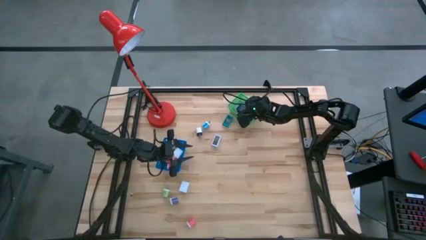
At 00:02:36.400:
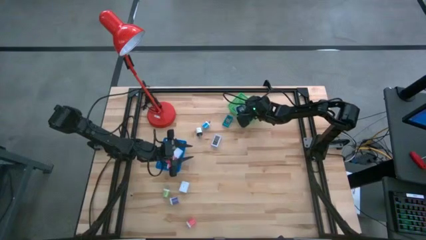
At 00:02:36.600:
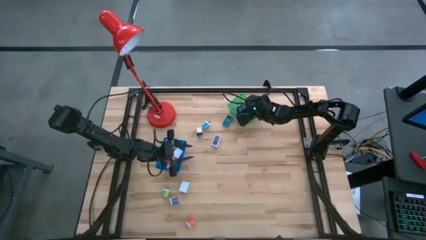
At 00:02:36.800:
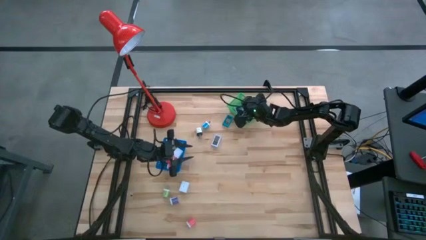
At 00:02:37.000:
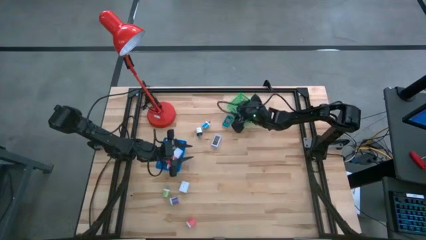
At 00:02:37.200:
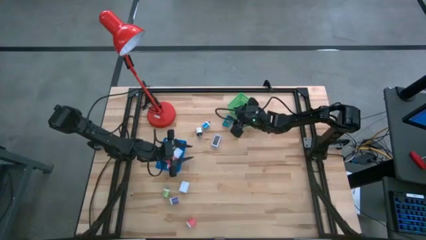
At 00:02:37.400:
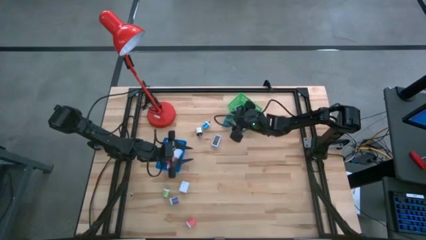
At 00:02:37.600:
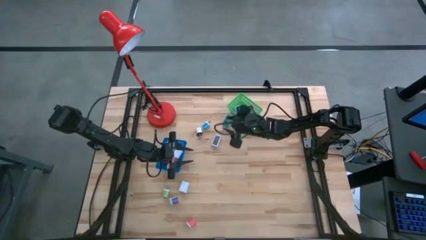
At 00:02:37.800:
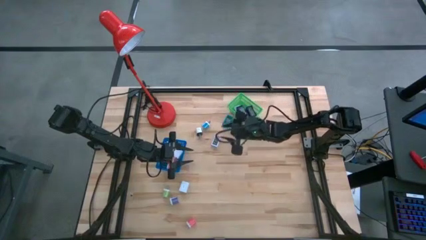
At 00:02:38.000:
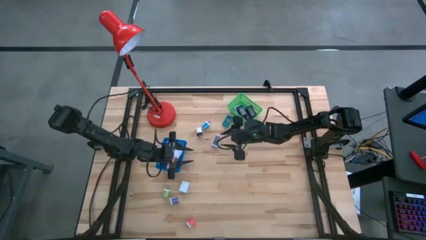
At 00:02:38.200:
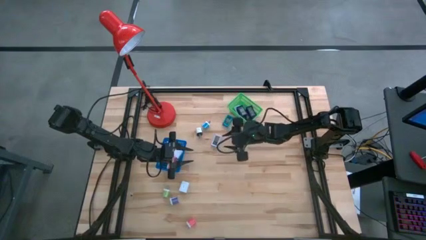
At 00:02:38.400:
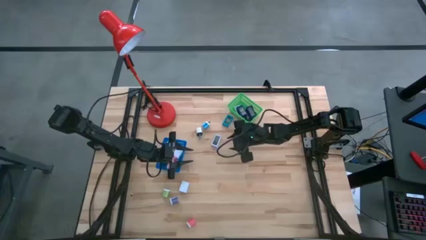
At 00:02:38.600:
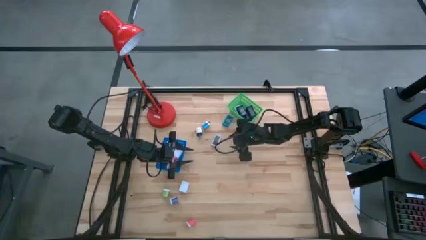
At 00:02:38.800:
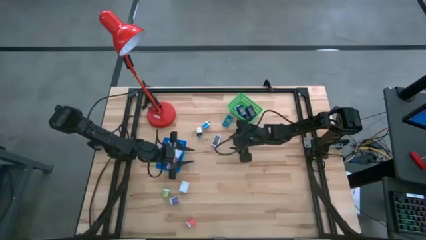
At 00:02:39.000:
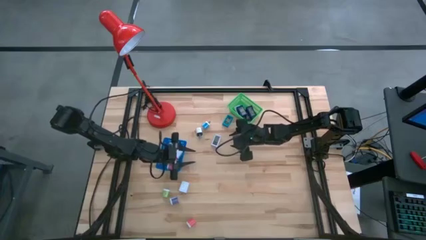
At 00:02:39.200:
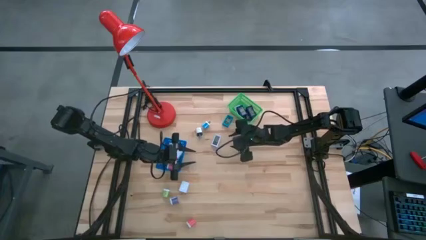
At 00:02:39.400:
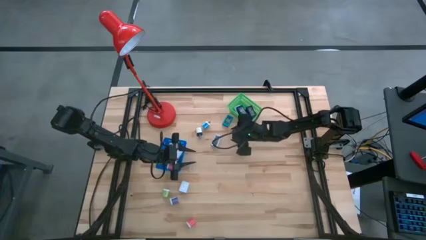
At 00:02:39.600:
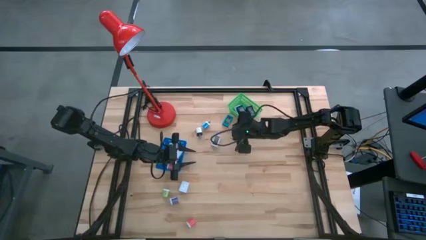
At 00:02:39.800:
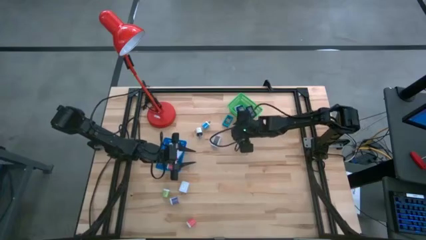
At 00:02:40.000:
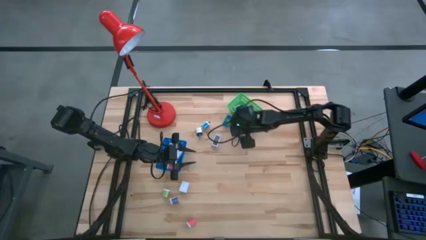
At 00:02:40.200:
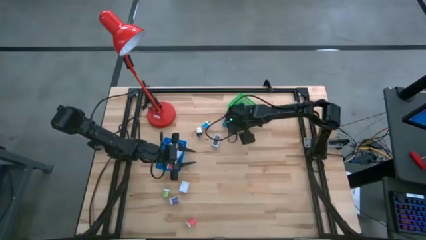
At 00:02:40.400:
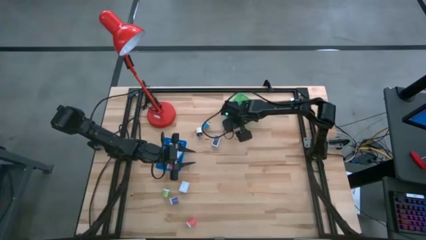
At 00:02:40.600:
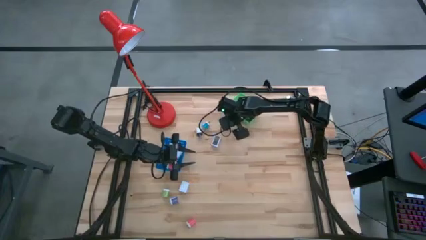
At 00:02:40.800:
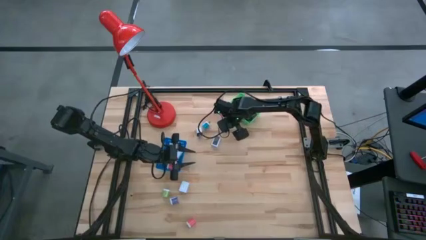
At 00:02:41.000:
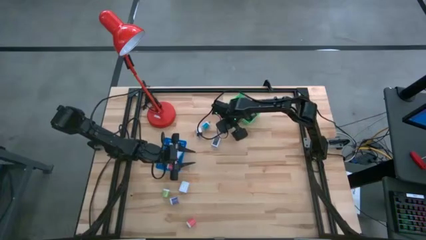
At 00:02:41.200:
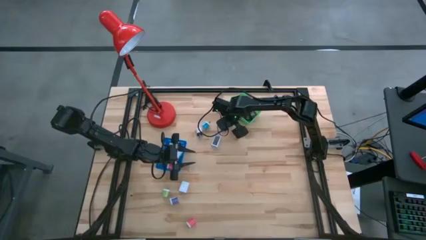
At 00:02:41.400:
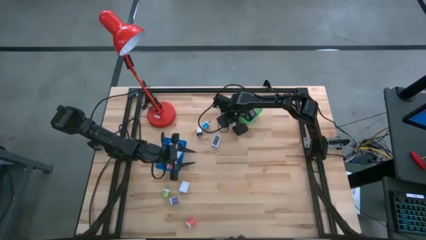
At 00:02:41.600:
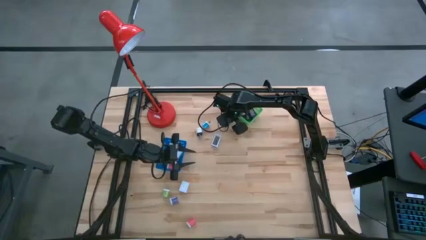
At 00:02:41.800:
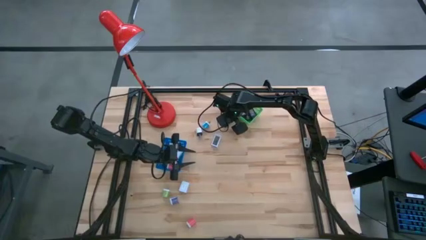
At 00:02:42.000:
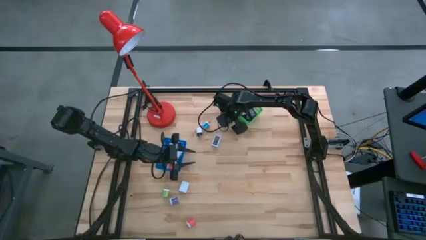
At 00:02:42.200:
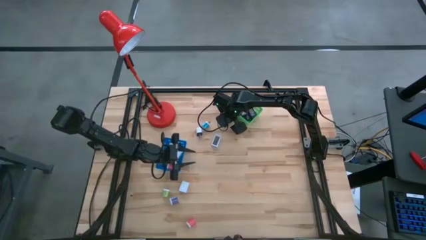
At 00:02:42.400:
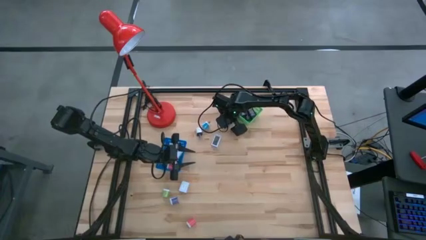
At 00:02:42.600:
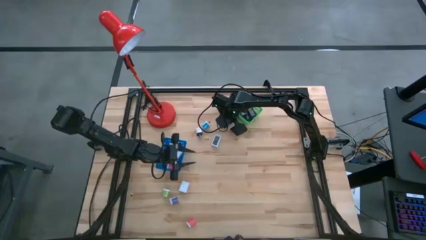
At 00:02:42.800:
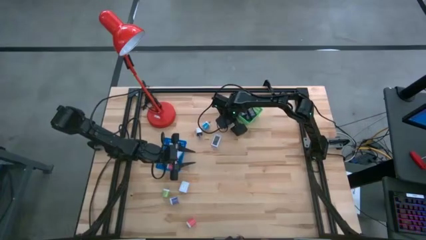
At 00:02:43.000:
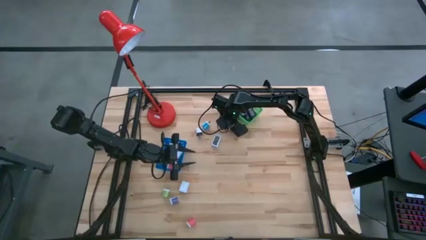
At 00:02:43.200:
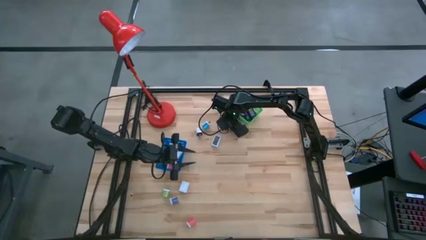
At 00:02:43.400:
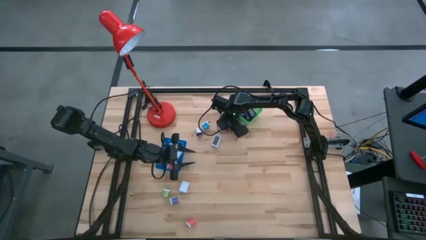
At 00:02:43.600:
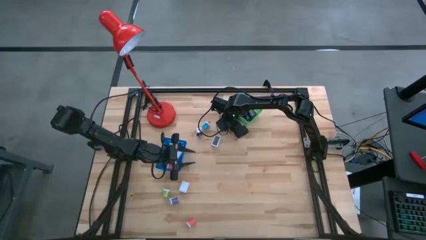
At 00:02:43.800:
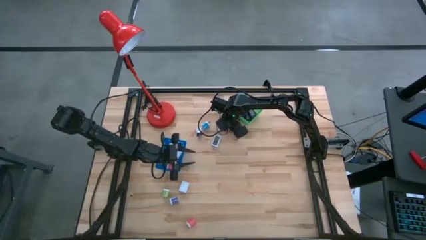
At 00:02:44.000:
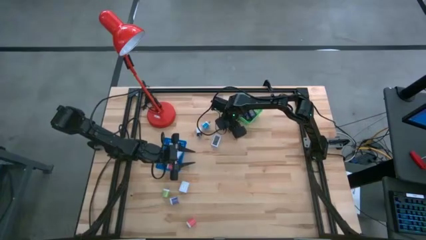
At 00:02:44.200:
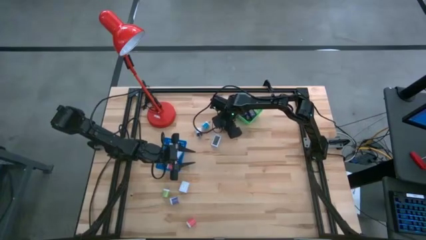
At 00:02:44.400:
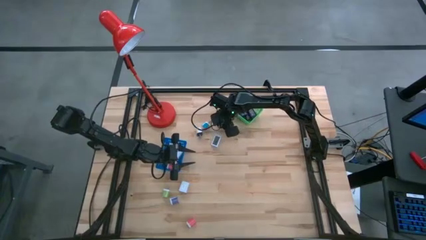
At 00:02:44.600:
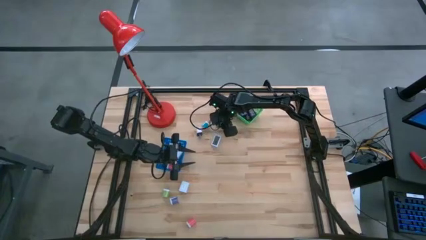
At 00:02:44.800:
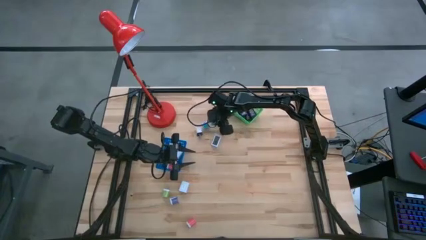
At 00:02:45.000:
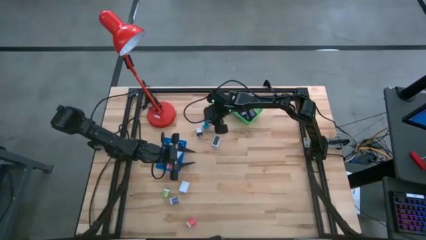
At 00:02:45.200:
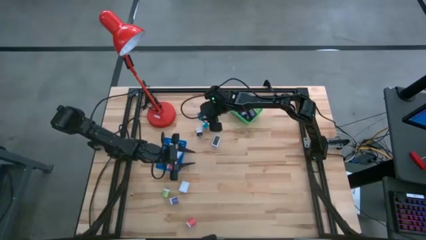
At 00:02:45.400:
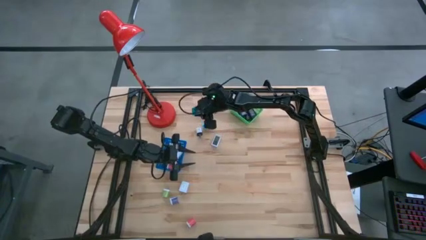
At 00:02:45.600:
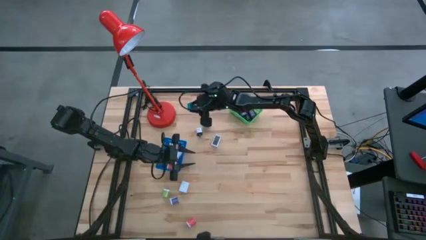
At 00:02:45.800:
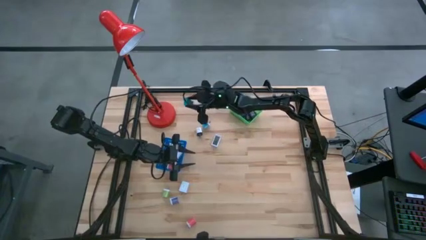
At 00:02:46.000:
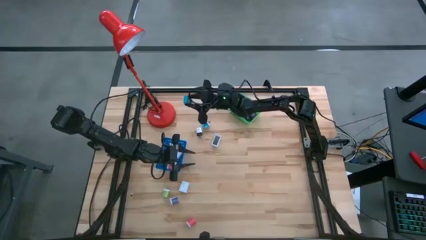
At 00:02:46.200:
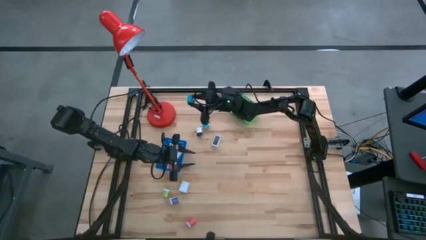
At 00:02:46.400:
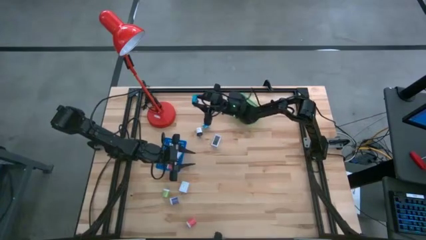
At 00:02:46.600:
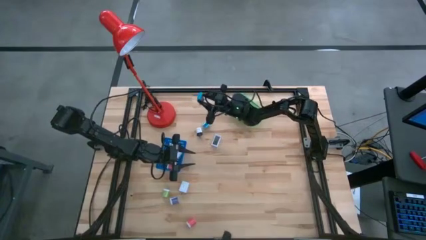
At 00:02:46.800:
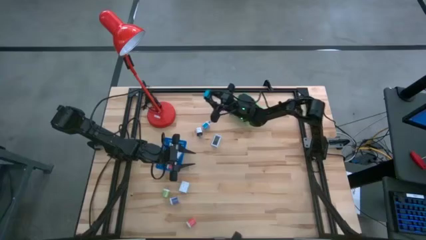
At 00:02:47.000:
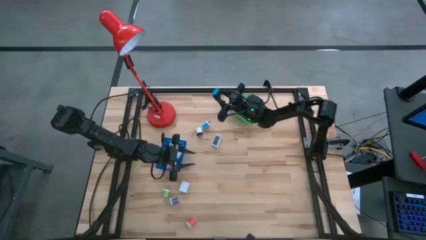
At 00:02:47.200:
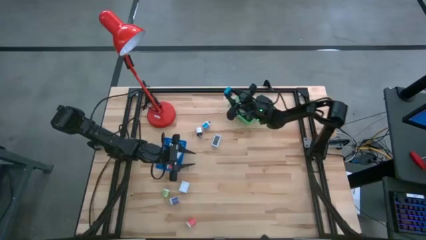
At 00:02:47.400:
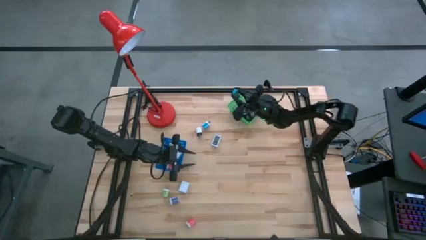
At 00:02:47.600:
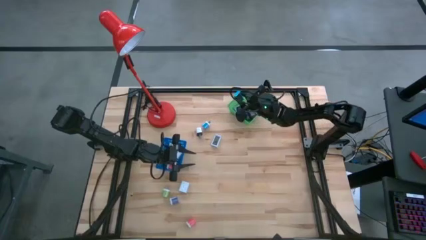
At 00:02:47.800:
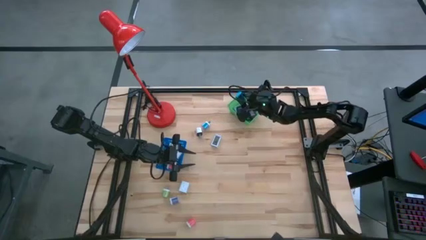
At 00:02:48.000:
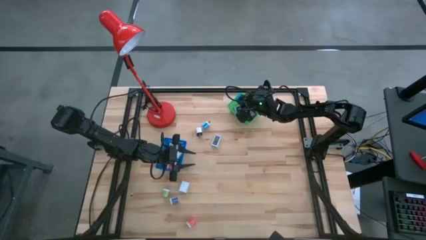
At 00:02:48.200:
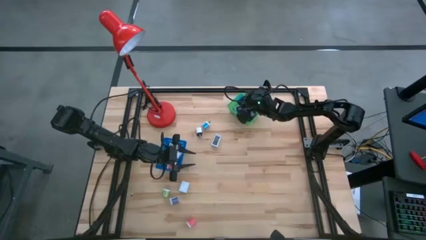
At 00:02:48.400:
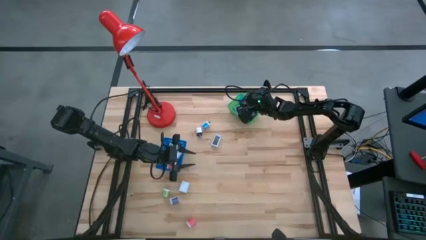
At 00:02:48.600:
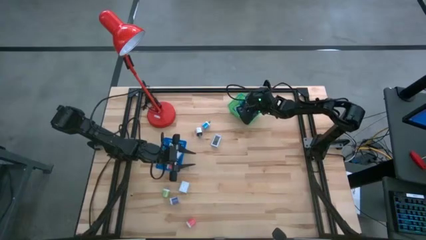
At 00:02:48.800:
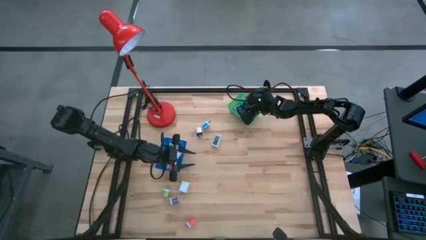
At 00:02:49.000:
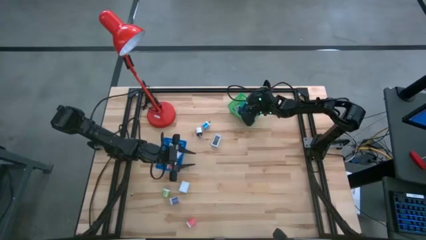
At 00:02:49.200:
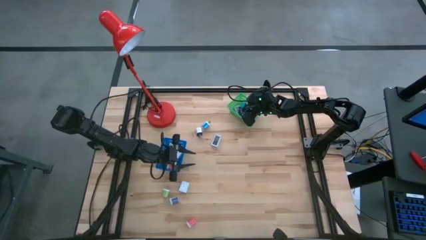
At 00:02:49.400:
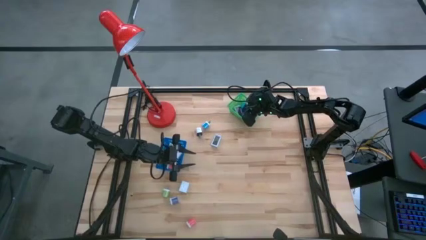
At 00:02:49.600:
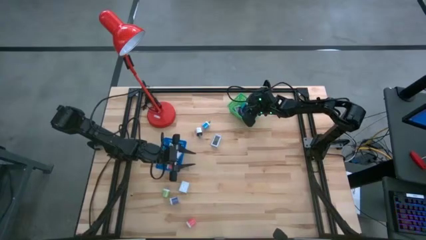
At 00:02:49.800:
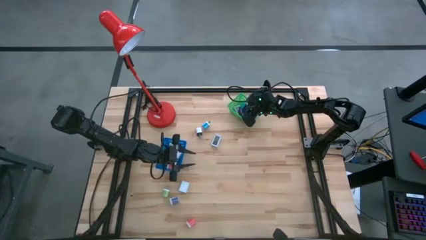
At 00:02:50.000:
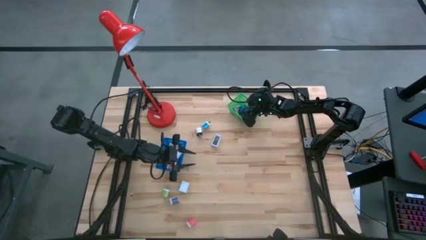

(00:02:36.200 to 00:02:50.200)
Task: Pick & Place Office items
Put the light blue digital clock into the green basket
